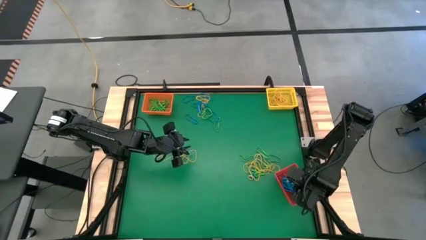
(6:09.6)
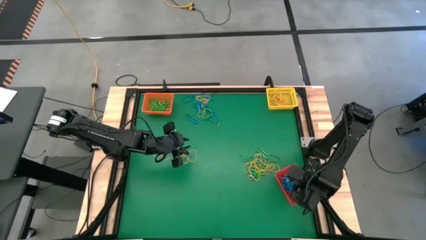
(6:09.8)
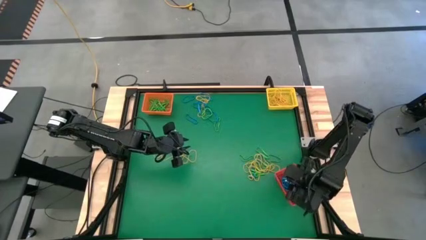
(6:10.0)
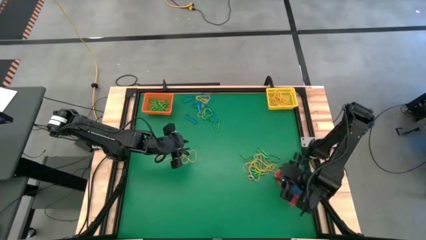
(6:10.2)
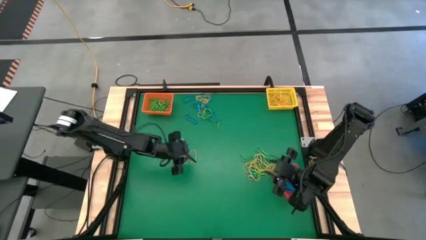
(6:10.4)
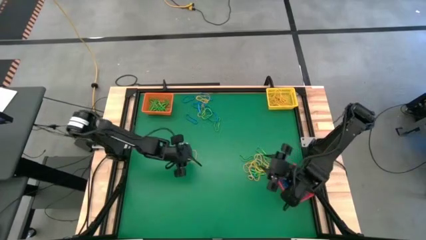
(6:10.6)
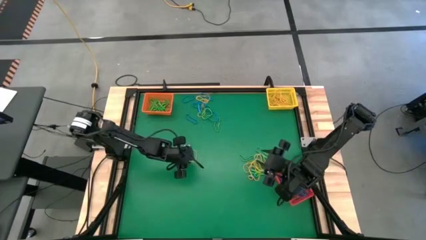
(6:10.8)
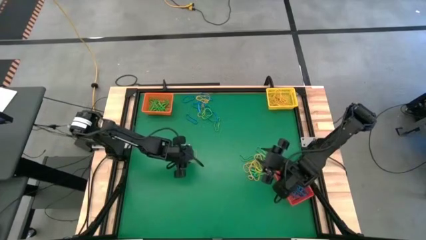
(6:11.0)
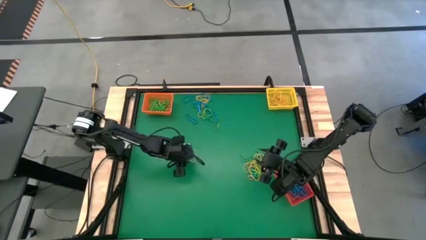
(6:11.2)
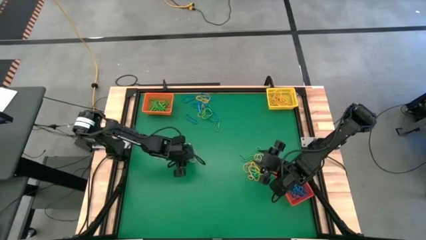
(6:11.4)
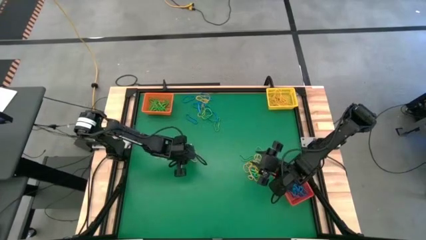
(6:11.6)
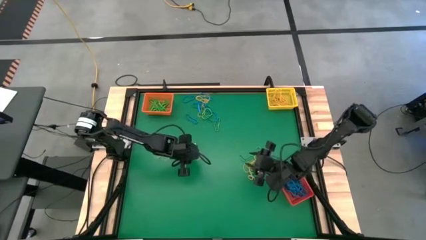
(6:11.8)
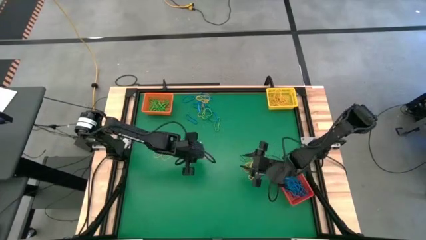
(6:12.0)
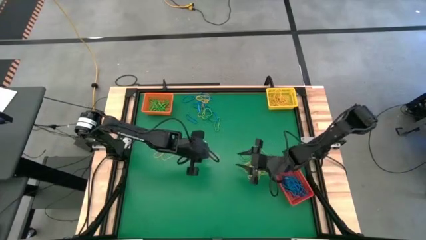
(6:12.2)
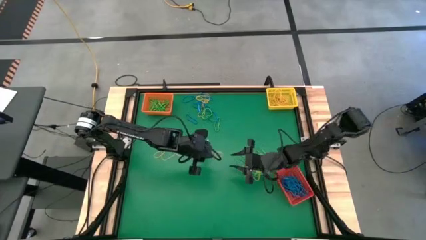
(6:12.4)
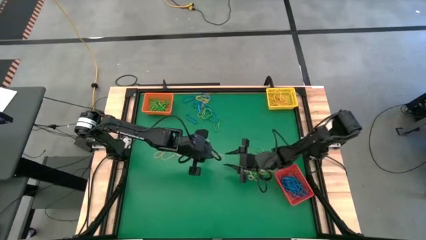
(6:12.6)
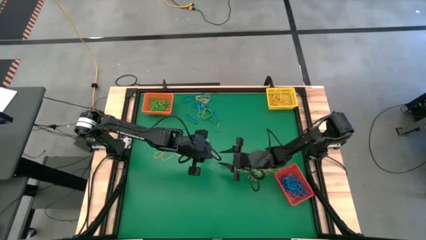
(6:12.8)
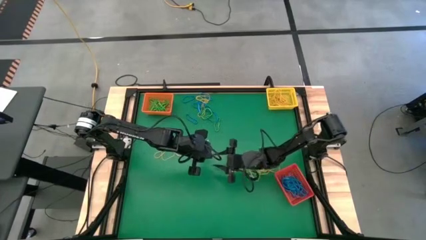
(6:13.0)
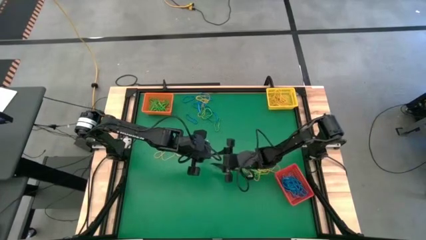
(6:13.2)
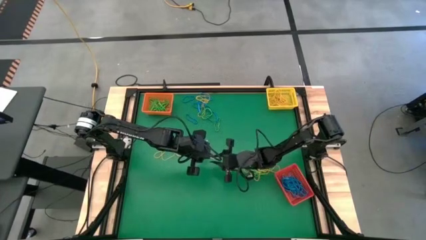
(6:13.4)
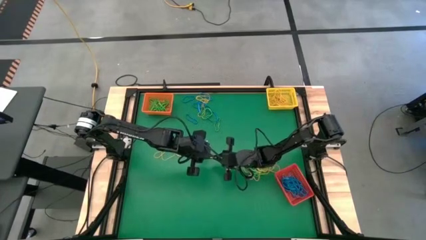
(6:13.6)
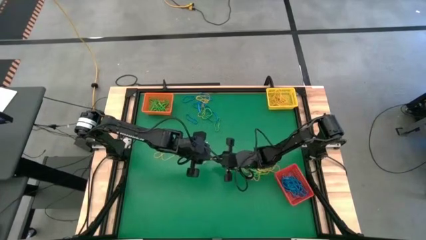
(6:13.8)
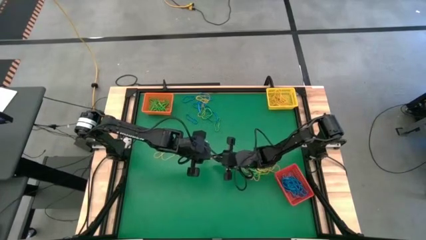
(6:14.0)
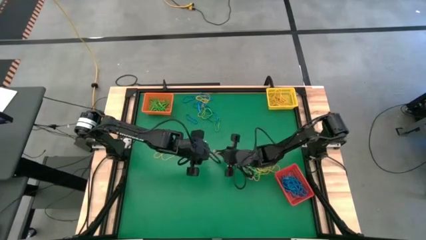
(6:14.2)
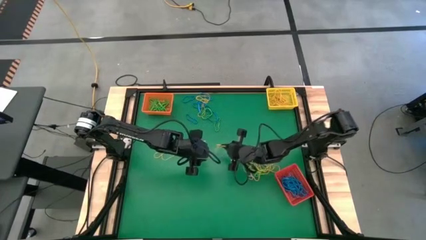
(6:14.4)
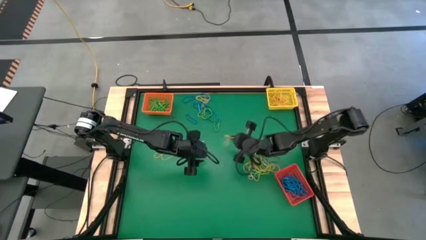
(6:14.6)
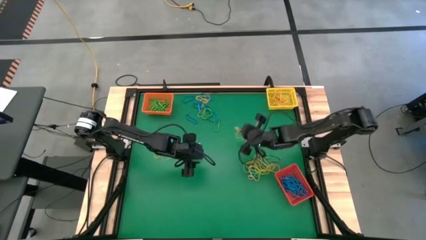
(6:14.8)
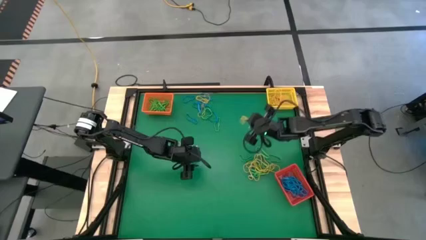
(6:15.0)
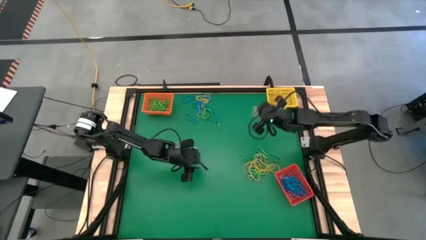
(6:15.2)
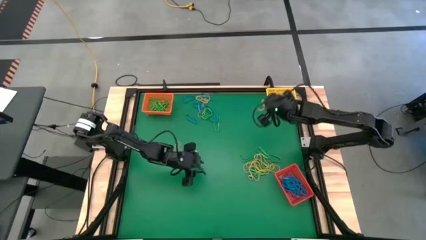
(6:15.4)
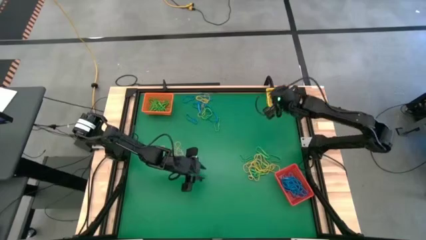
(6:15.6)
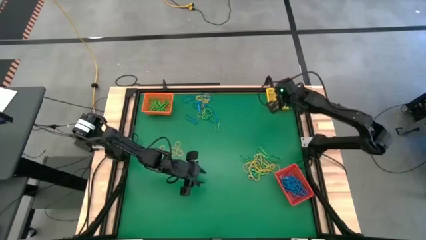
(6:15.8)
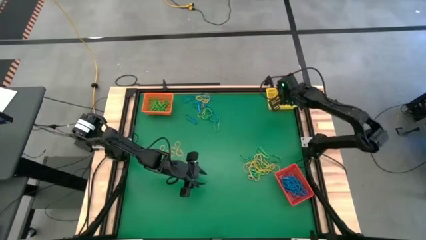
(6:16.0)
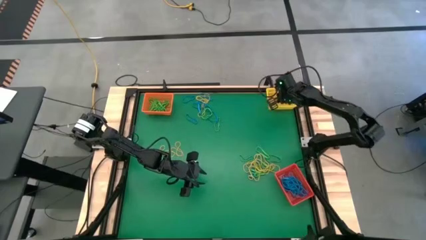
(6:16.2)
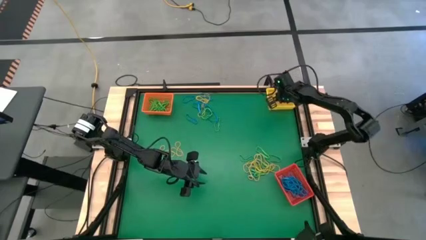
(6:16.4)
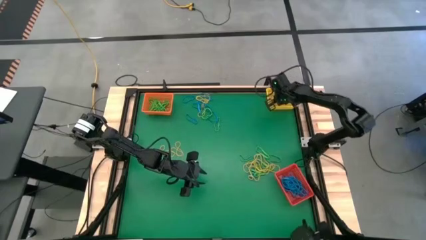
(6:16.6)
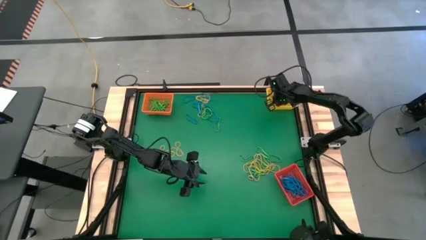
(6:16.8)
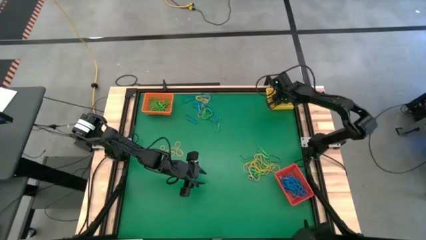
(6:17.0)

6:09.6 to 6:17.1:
Task: Sort rubber bands into baskets
Put the yellow rubber band into the yellow bin

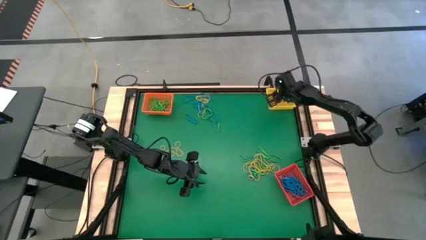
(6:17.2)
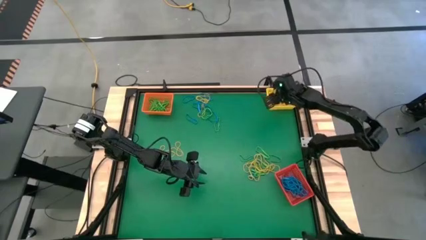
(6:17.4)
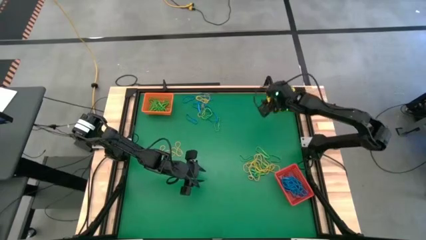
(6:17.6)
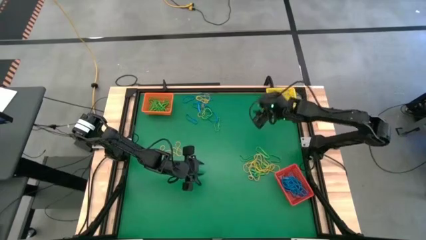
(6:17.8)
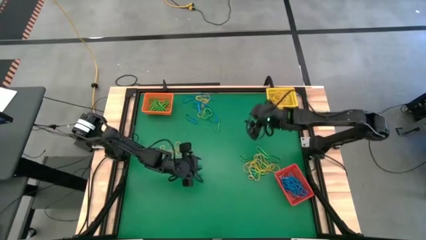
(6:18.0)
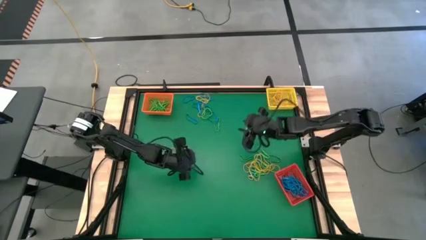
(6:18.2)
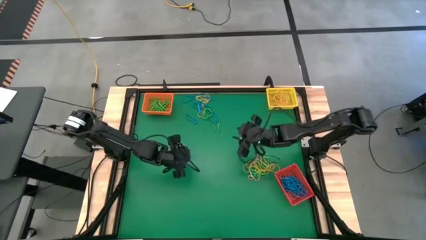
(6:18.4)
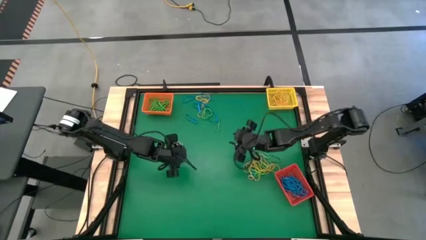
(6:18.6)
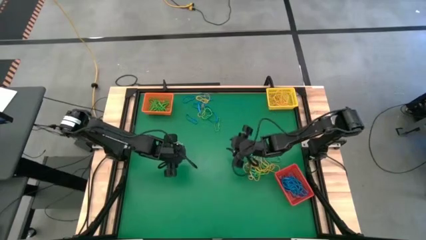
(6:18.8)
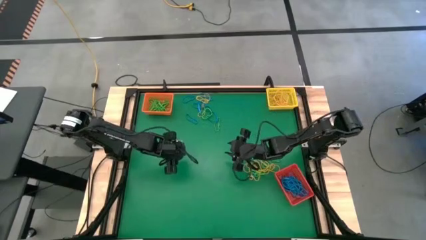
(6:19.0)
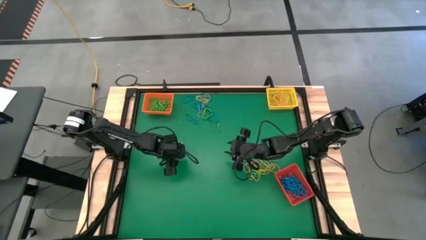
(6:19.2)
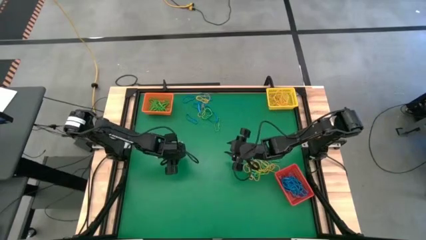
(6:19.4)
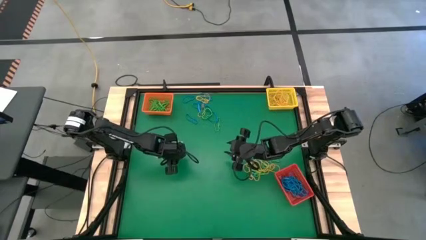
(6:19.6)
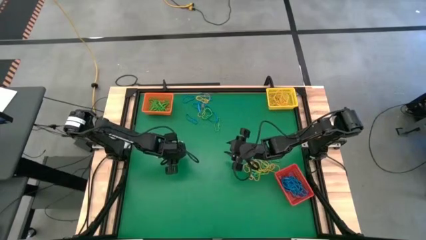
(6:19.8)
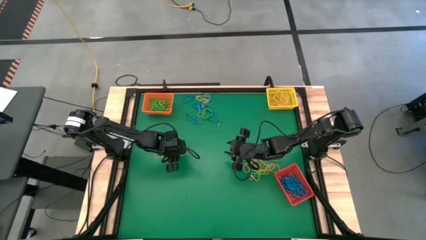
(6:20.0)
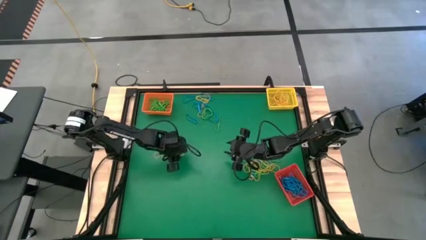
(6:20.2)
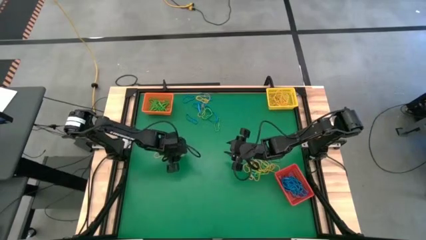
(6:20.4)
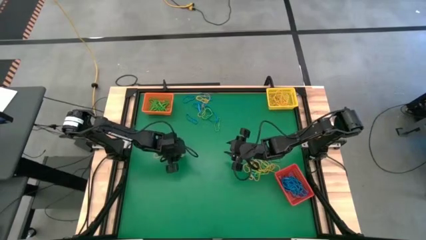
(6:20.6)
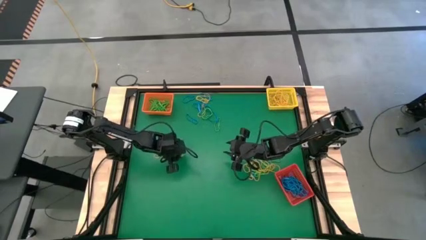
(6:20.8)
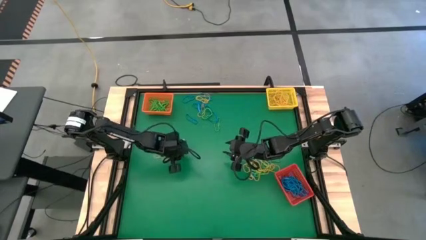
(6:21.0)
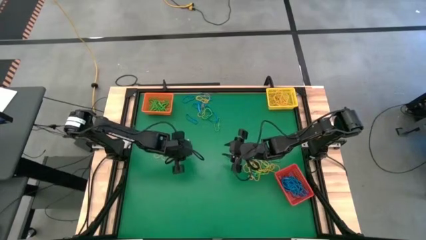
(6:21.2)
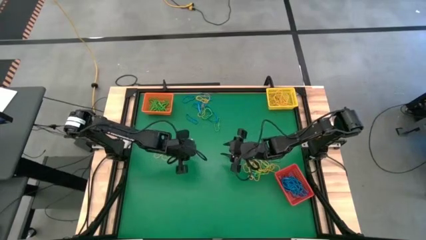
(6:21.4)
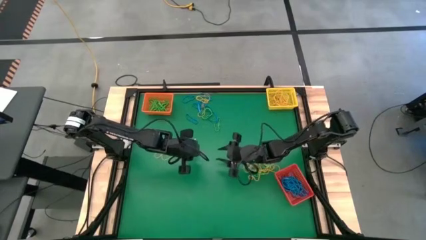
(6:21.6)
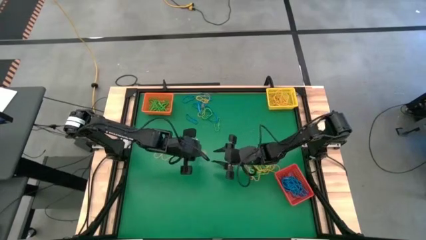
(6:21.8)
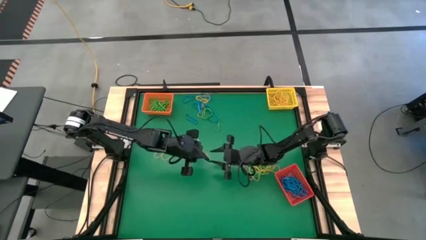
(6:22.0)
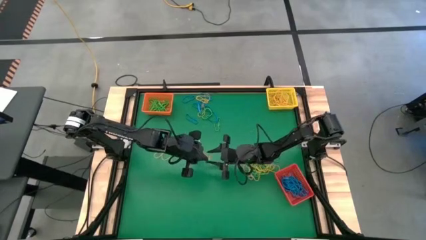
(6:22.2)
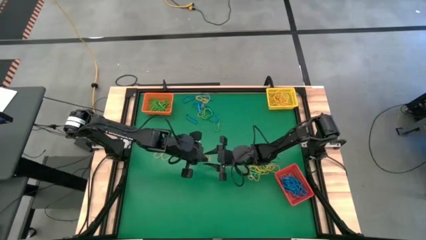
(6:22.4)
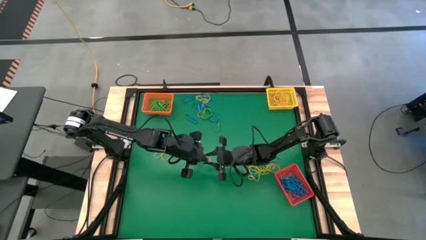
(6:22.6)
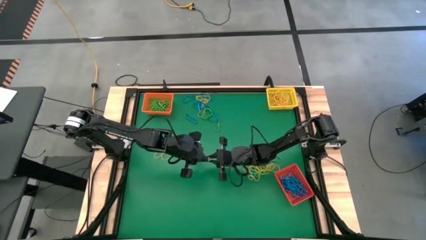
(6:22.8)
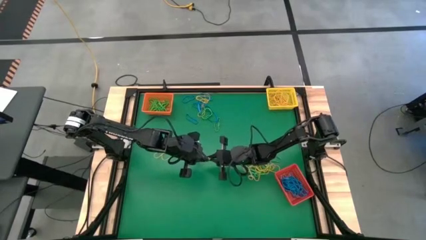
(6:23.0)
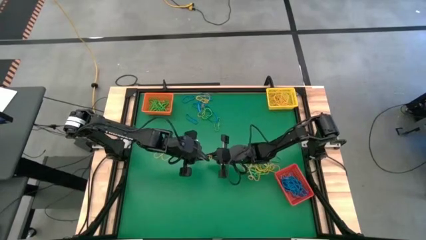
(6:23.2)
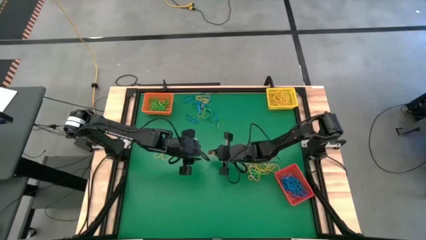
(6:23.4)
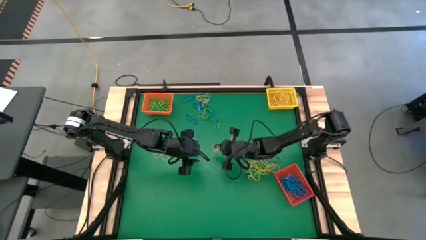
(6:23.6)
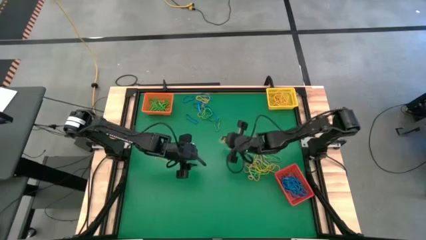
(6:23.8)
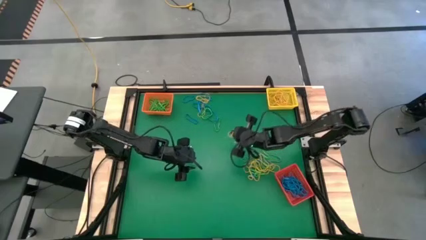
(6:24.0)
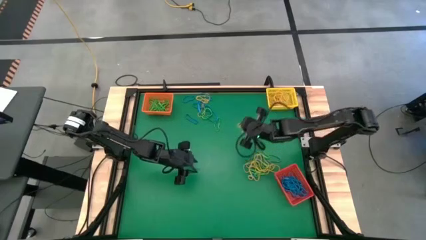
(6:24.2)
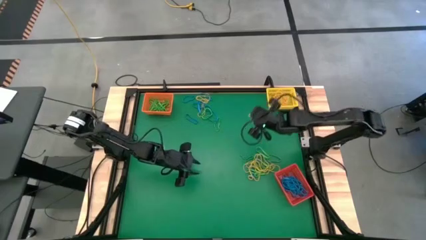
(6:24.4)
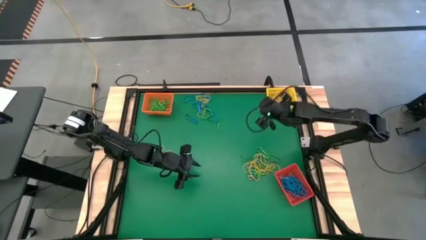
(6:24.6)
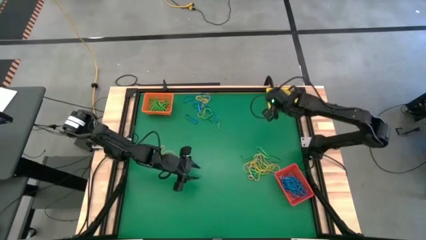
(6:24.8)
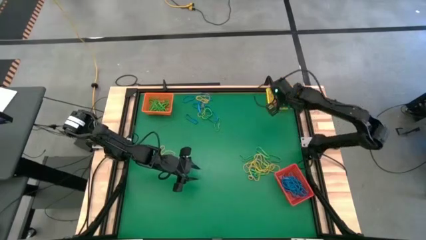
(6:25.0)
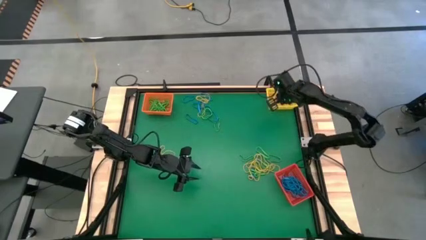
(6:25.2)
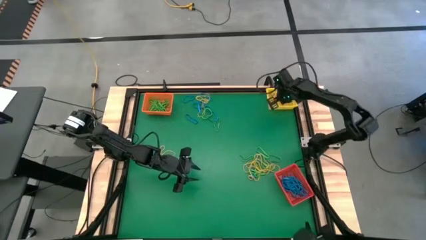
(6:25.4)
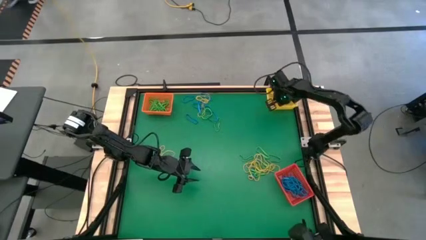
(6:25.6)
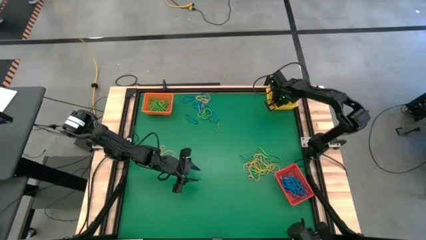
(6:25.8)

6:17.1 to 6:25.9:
Put the yellow rubber band into the yellow bin
